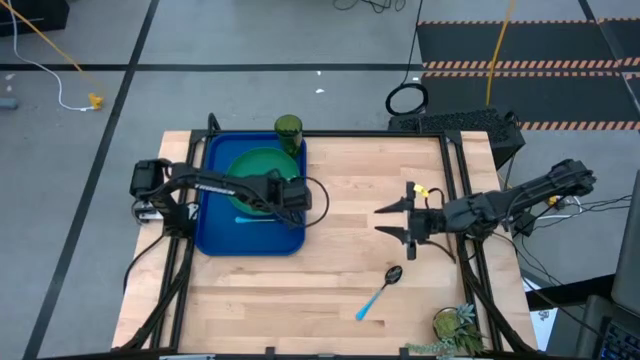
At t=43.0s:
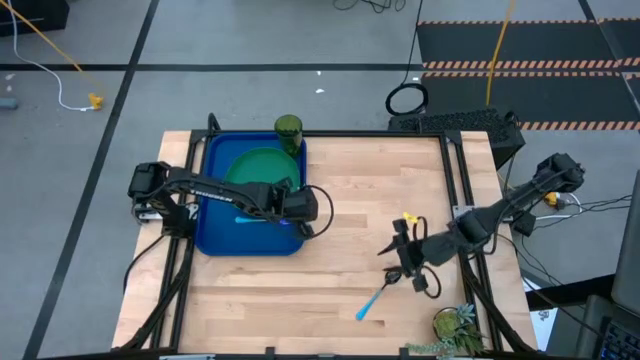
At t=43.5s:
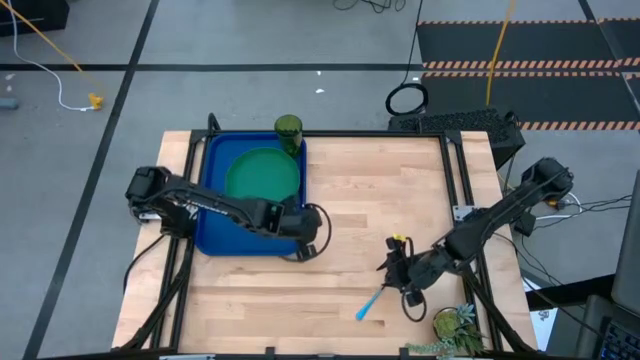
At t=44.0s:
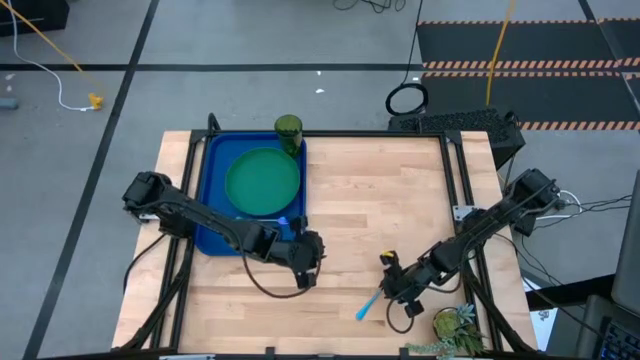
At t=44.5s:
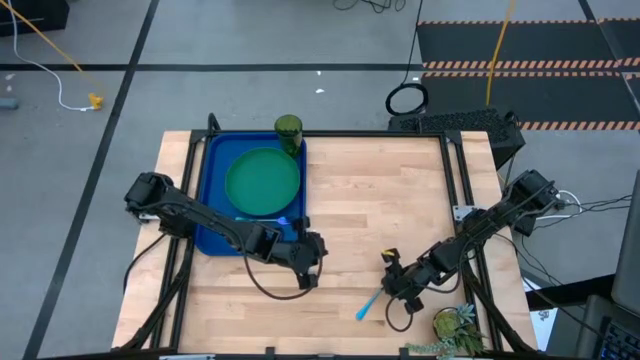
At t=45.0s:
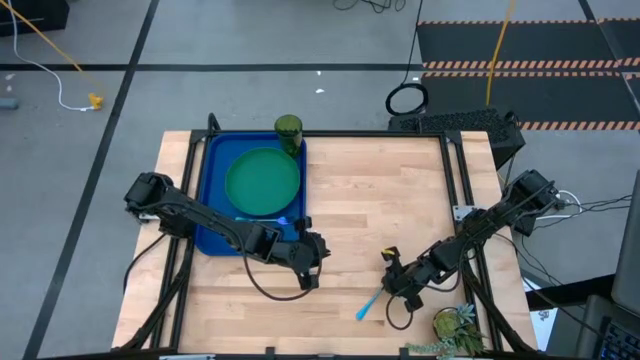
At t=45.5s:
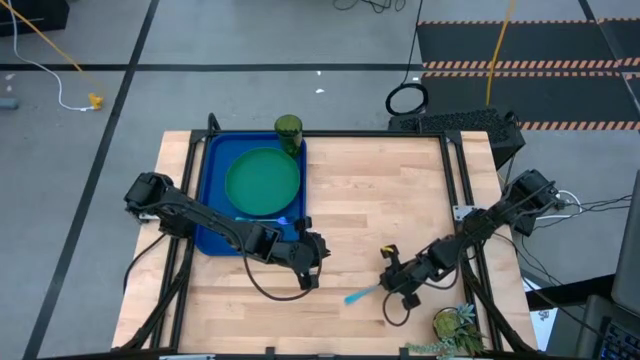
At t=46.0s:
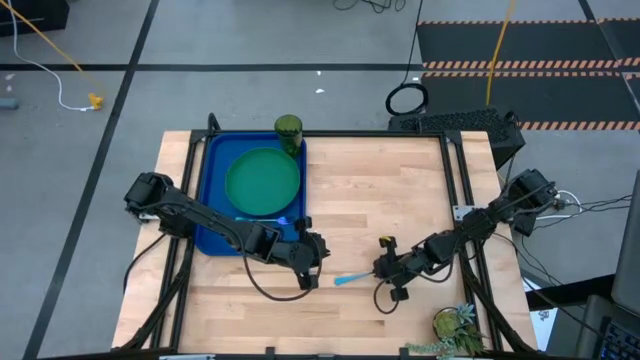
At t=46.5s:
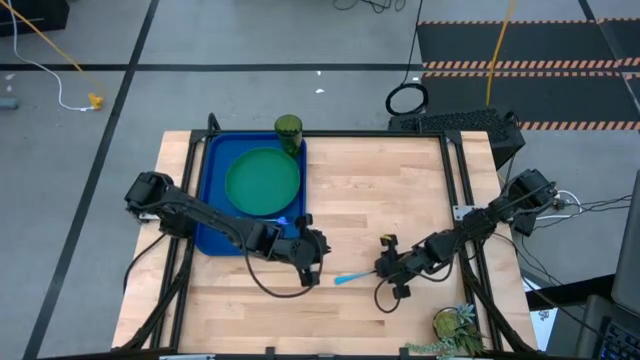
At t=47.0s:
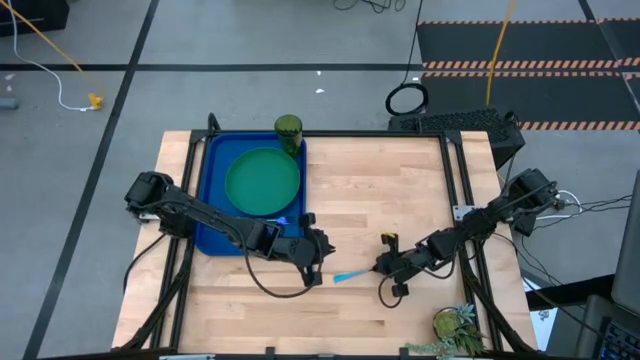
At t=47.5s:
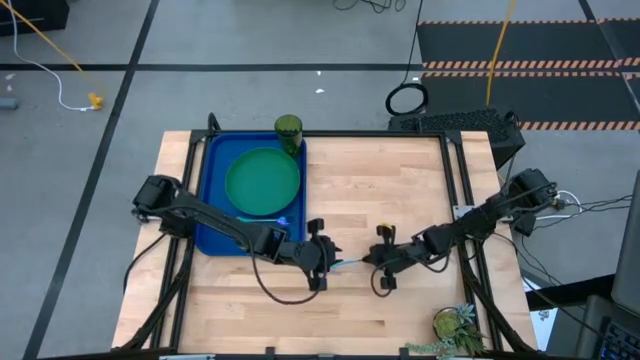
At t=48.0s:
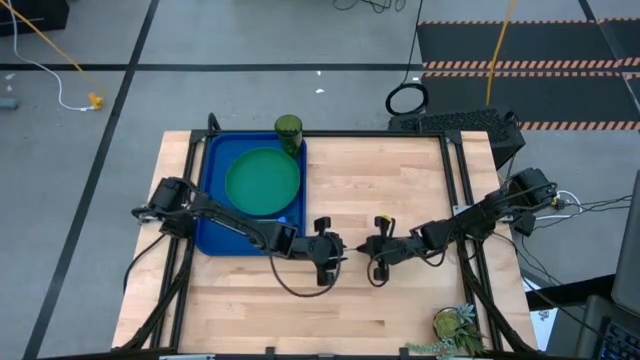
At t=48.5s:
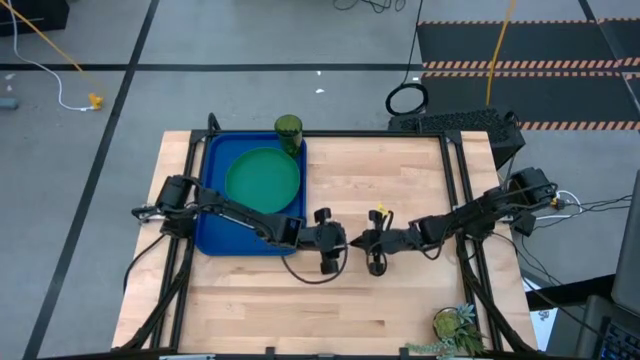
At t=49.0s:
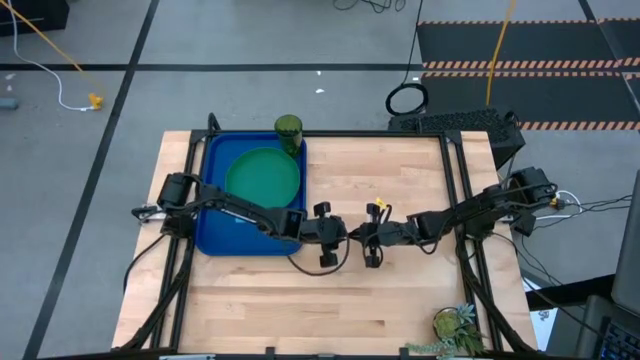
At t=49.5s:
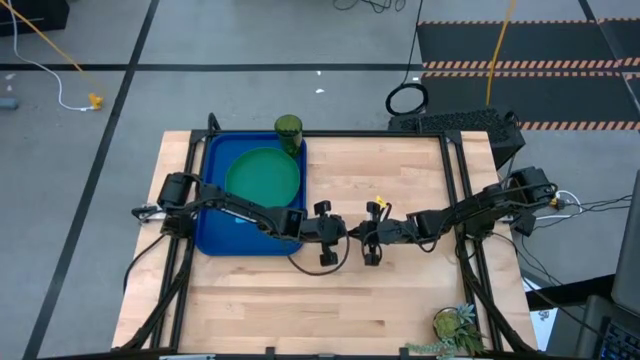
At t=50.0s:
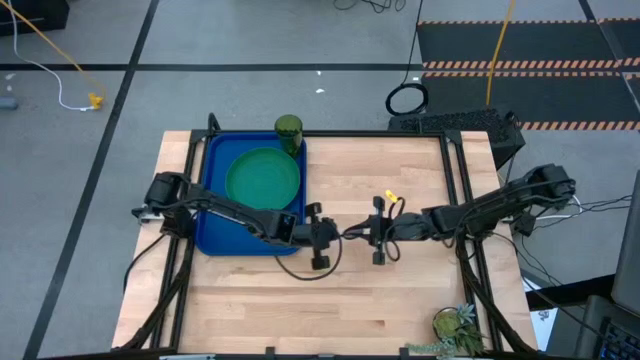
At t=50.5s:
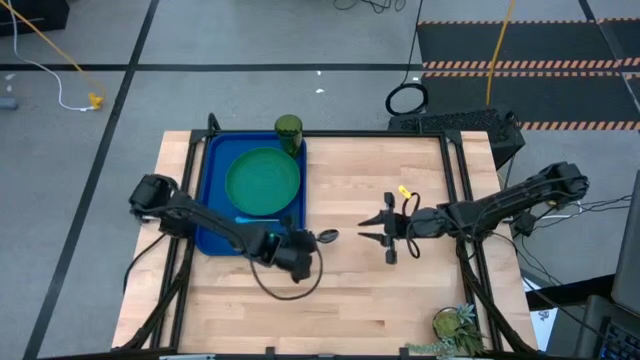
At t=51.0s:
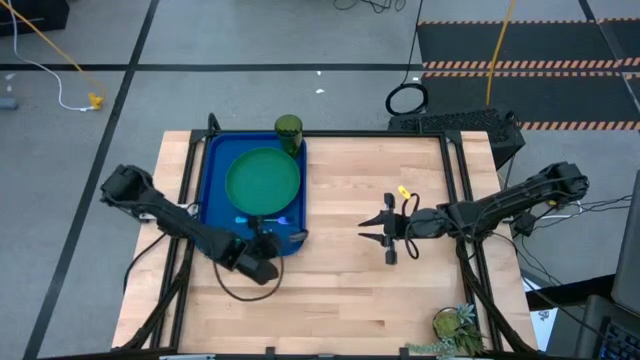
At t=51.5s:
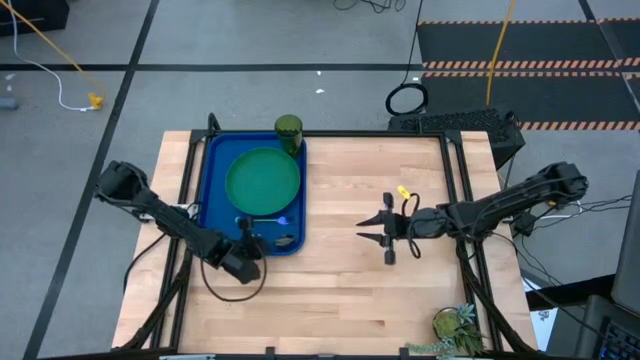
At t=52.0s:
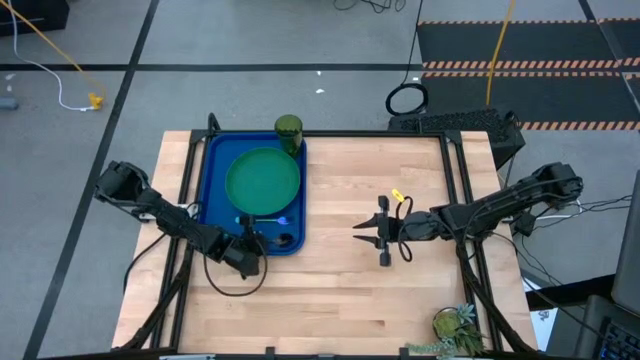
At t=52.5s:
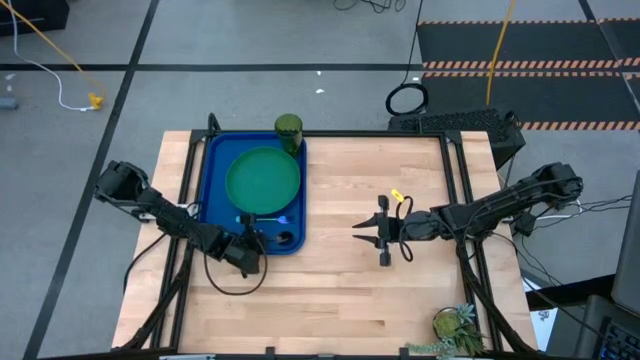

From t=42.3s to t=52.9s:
Task: Pick and place plate/cup/fork/spoon on tray
Put the spoon on the blue serving tray to the right of the fork

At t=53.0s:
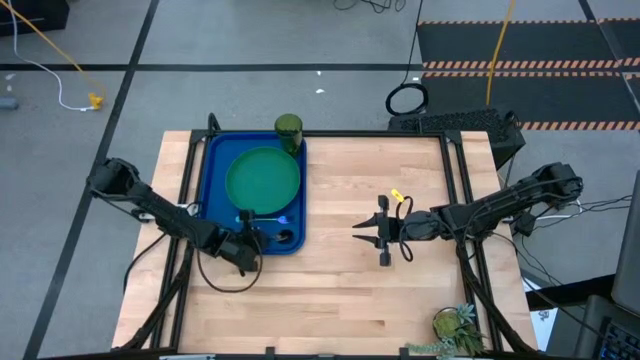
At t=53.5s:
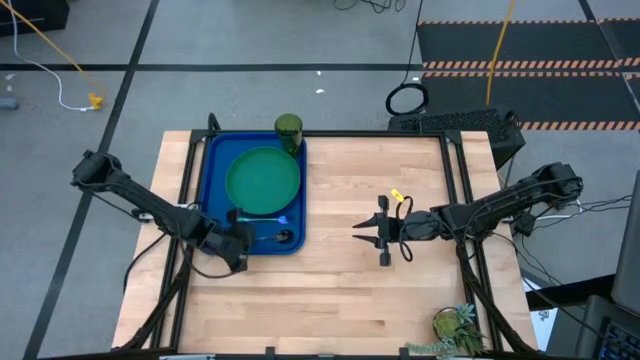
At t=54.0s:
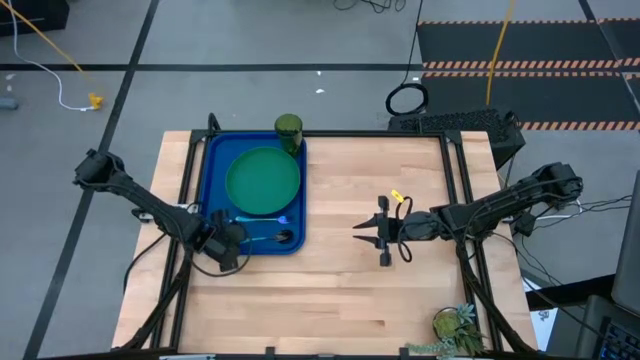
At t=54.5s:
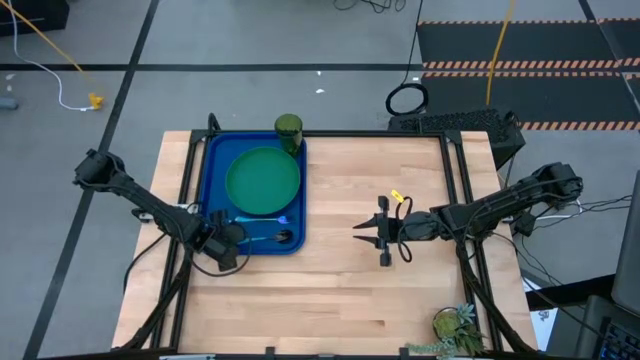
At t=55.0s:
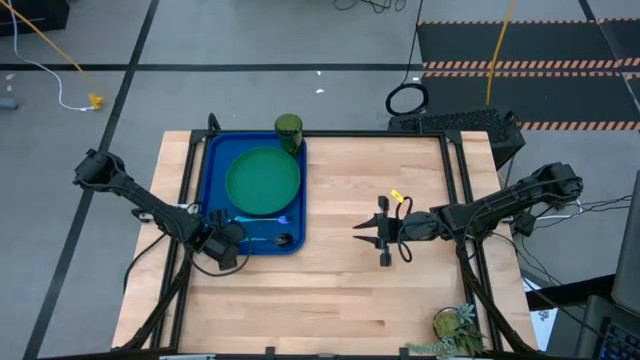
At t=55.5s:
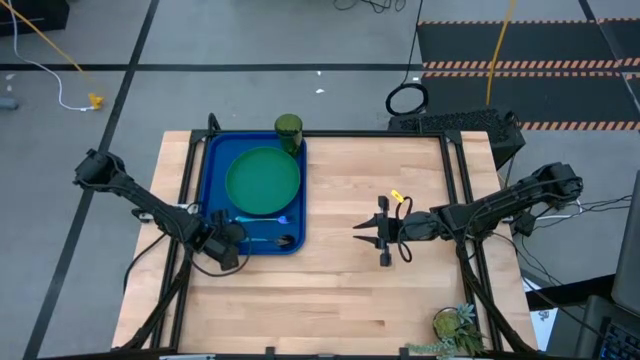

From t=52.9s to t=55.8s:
Adjust the spoon

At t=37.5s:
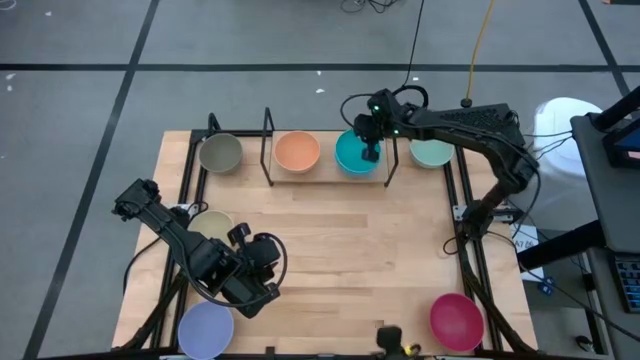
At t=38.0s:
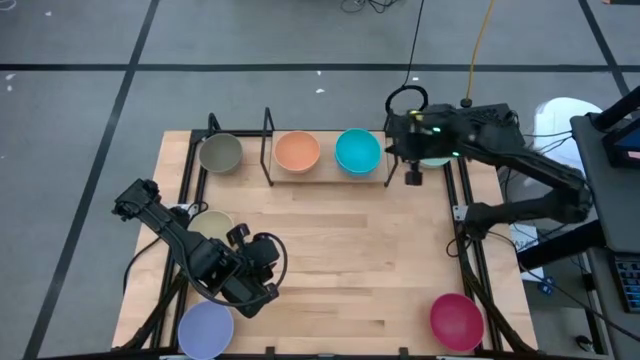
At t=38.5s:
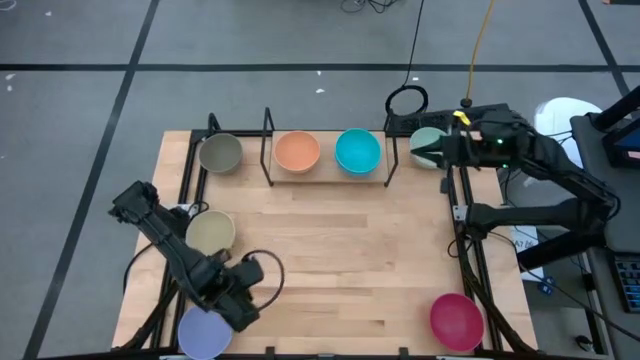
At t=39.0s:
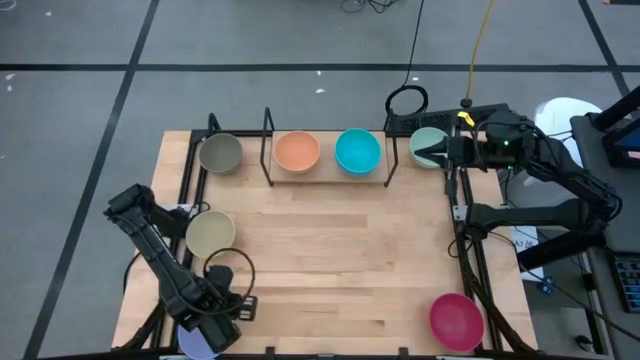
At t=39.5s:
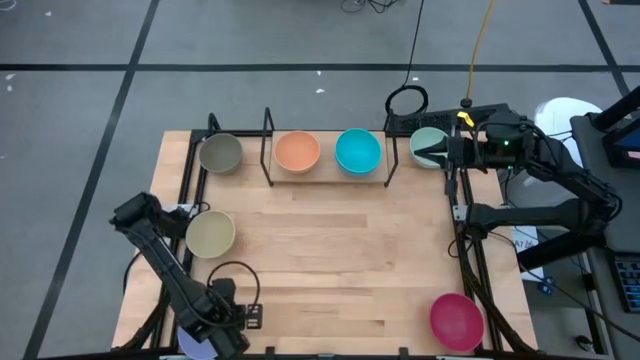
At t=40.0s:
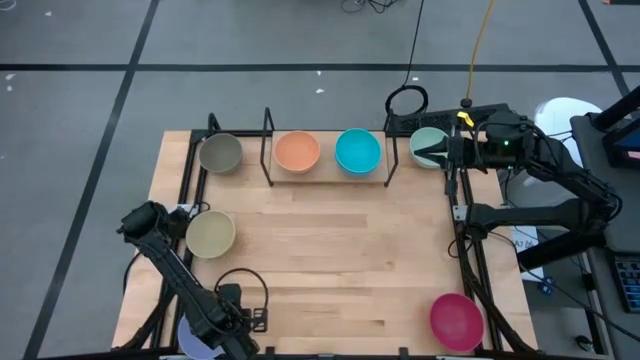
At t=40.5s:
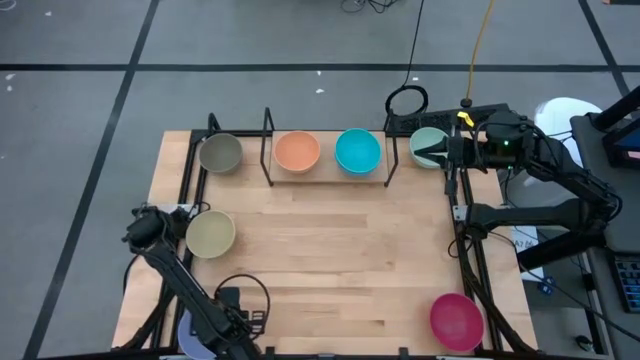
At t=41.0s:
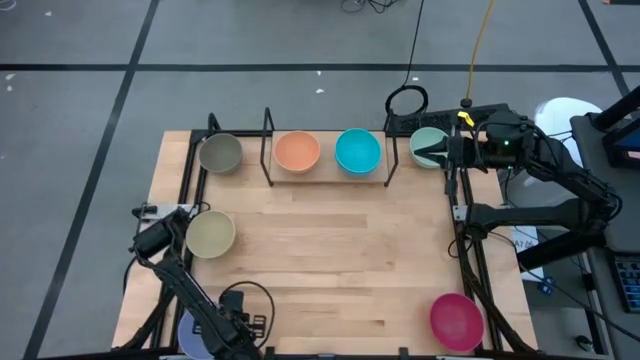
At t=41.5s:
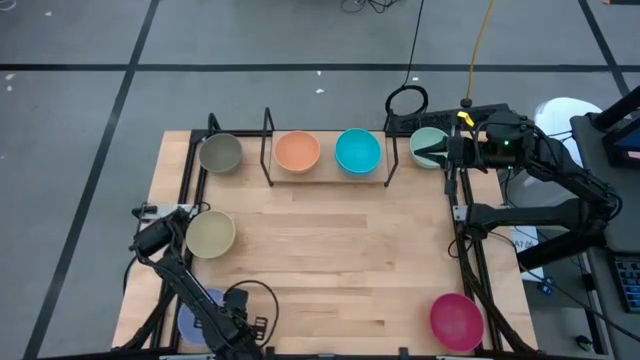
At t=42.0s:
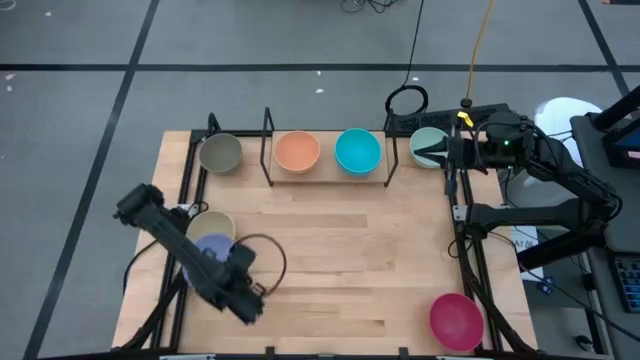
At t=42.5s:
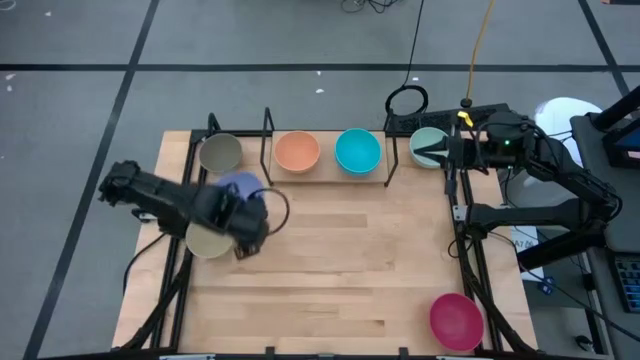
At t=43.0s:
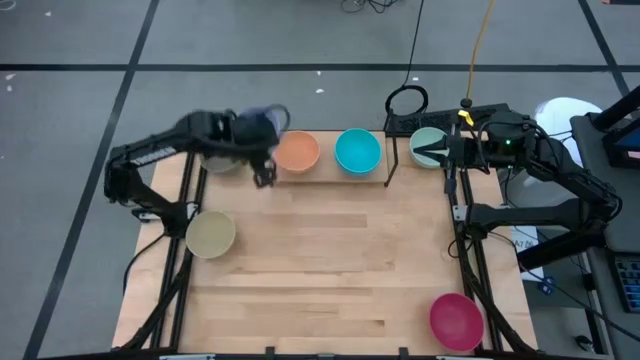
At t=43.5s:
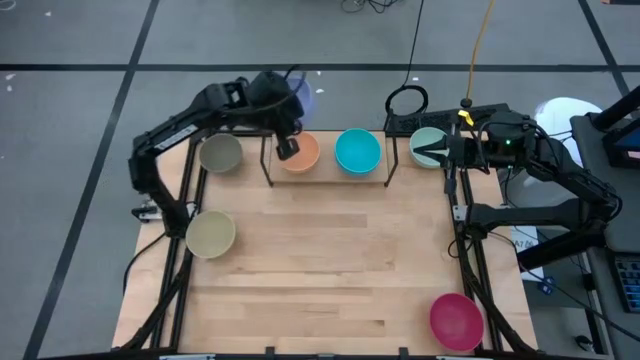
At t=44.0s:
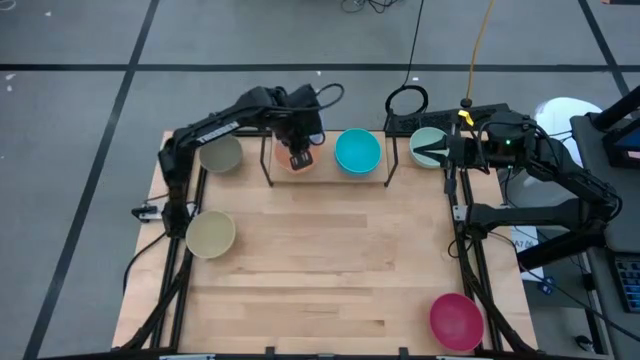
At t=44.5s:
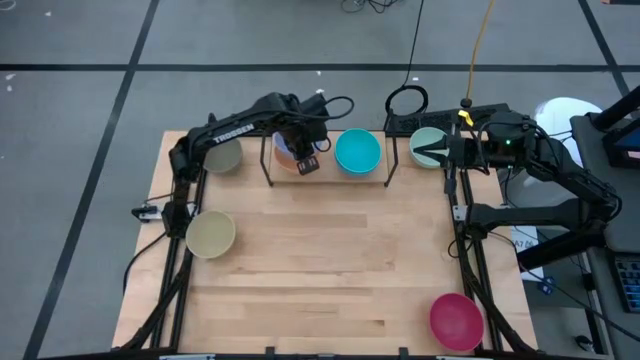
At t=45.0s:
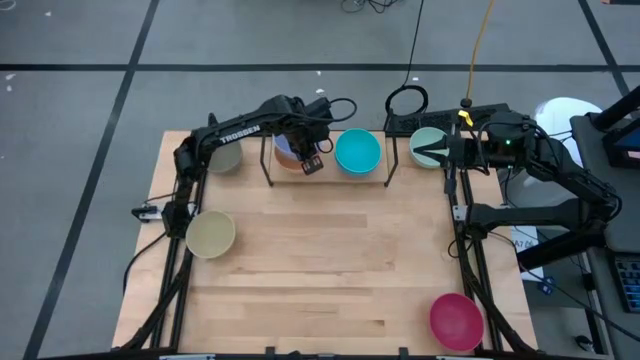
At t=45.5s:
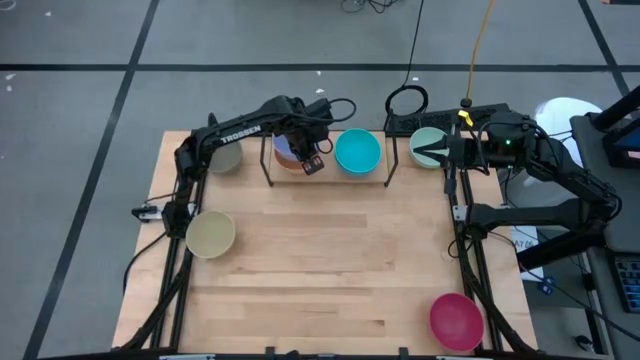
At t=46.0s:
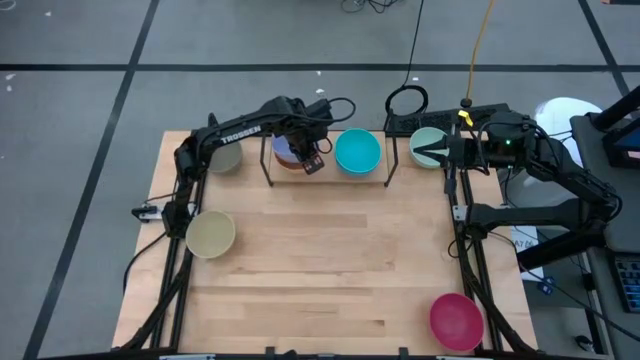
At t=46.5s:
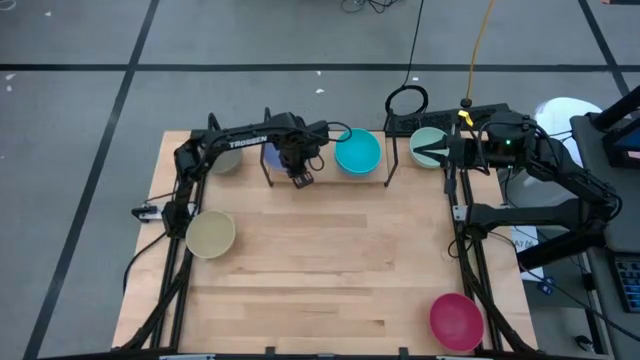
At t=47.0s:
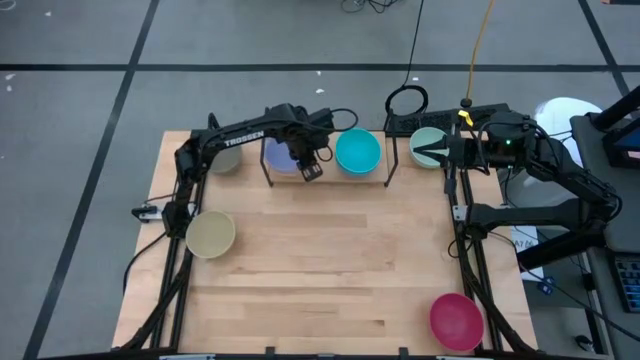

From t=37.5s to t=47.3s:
Task: Place and stack bowls onto a shelf
Stack the purple bowl on top of the orange bowl on the shelf
